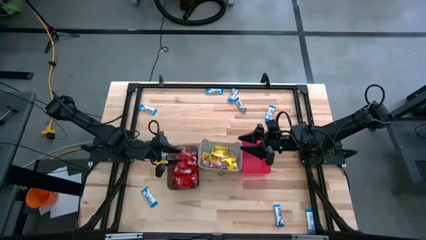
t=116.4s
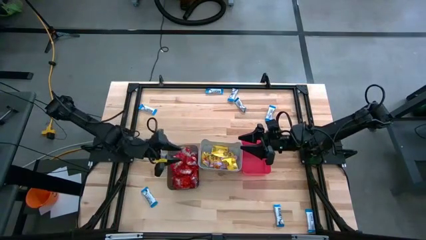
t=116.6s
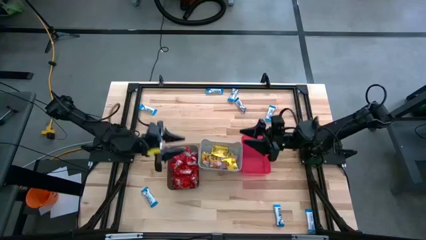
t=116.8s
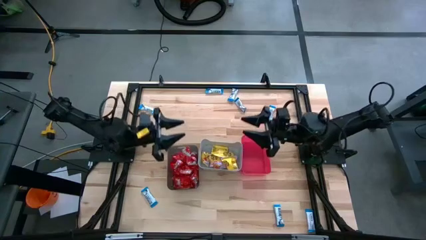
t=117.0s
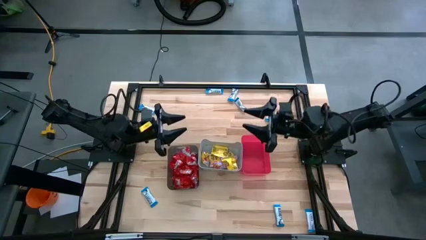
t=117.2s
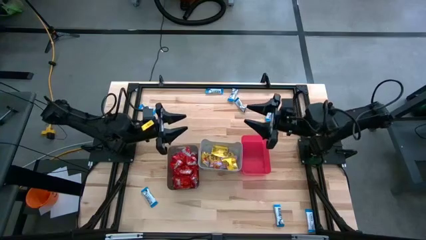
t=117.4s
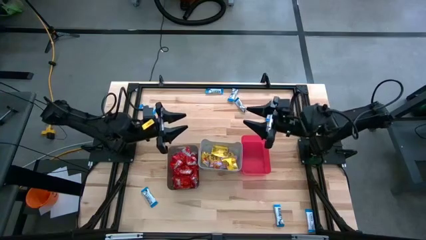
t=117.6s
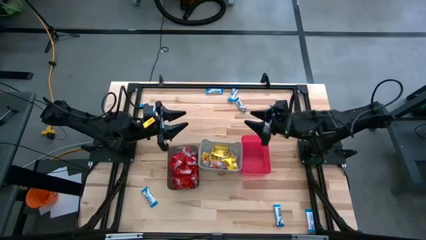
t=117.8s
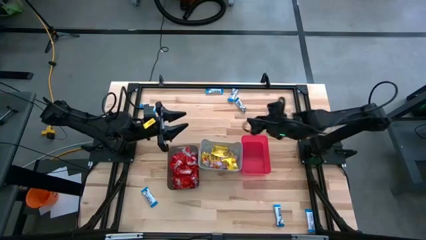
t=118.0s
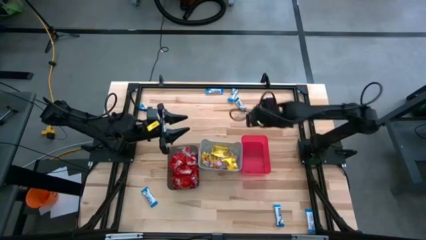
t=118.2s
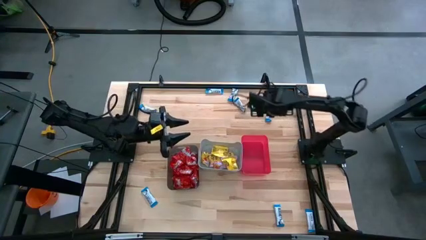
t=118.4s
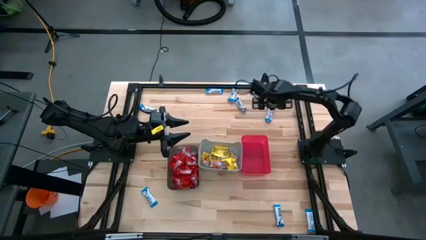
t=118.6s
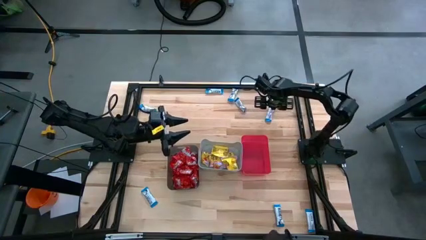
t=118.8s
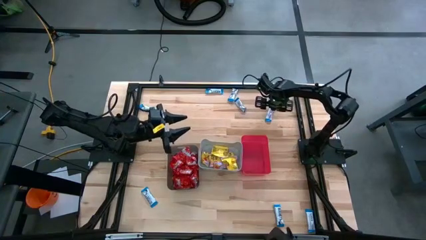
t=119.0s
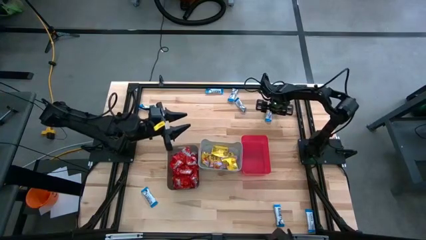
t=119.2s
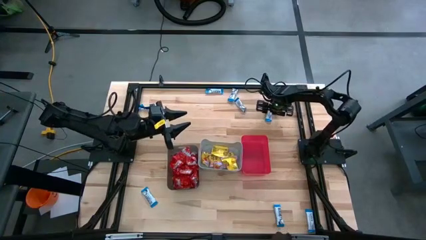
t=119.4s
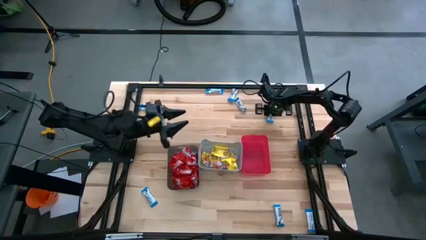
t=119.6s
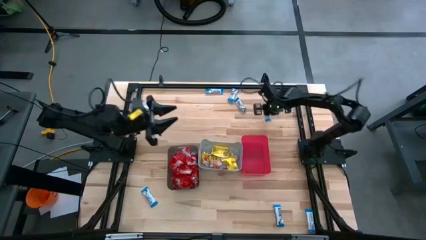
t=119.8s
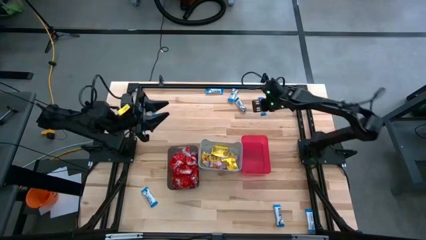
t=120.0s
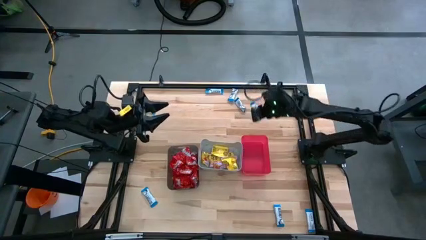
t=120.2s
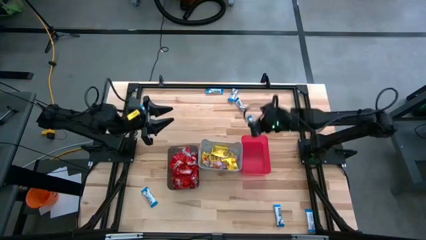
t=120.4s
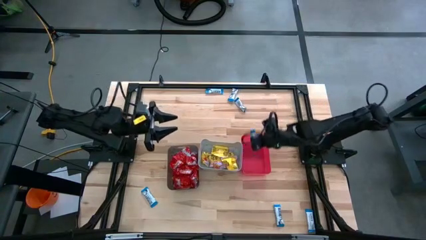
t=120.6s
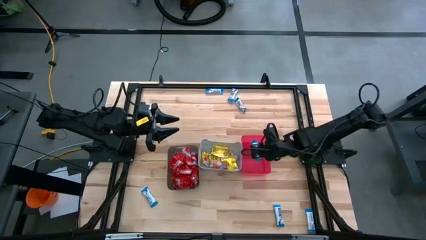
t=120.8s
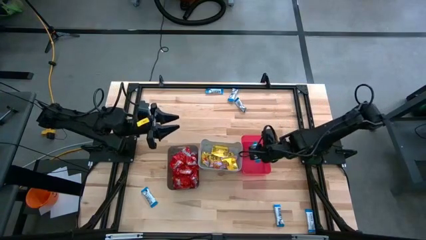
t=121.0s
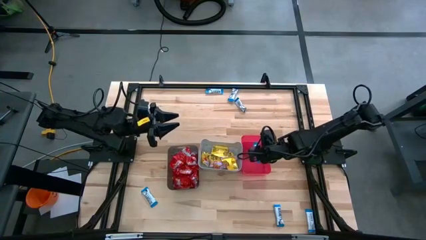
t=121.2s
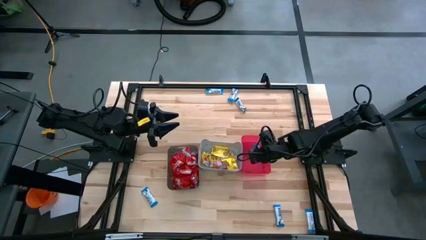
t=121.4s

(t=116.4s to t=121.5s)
Task: Sort candy
Put the white chocolate into the pink bin

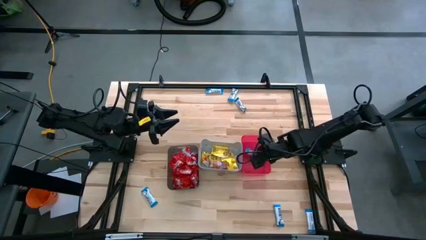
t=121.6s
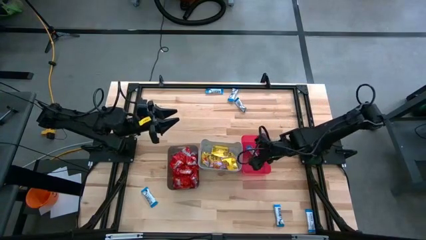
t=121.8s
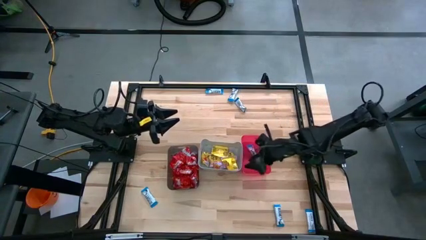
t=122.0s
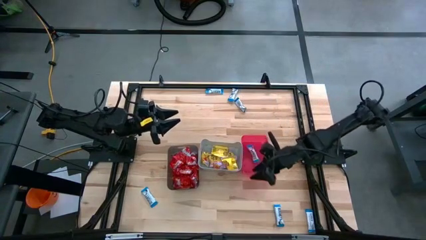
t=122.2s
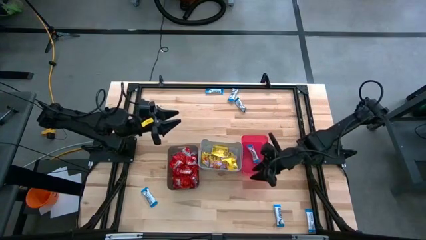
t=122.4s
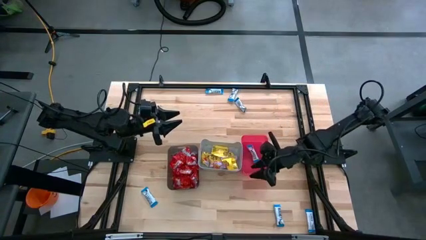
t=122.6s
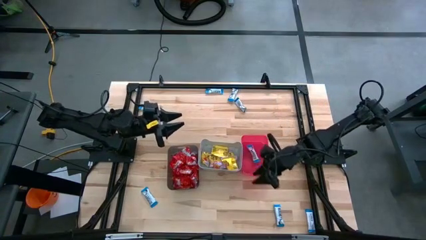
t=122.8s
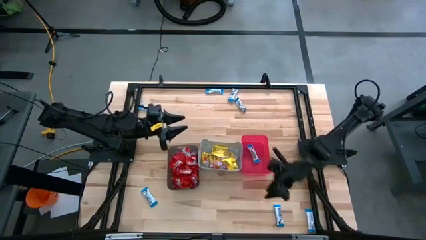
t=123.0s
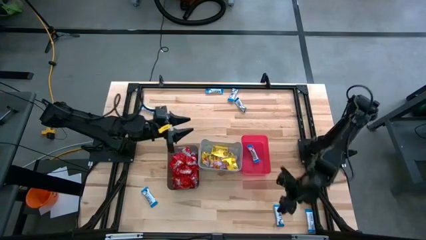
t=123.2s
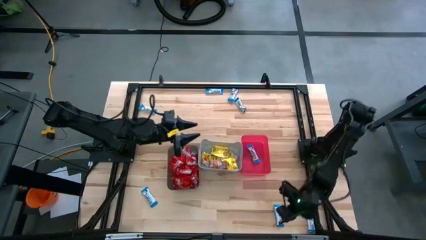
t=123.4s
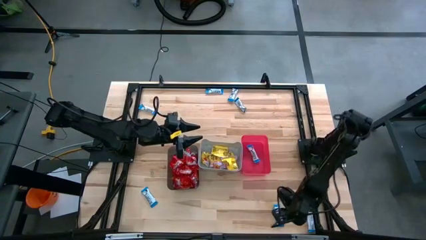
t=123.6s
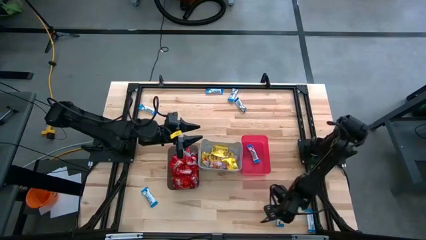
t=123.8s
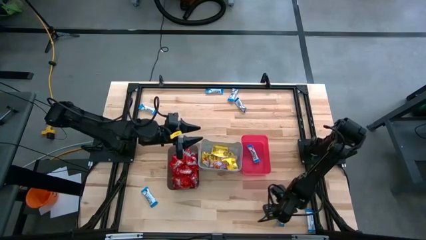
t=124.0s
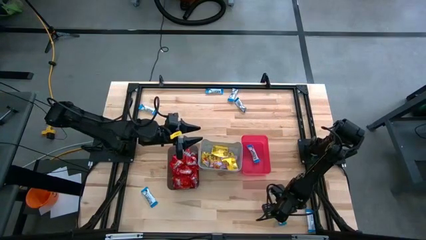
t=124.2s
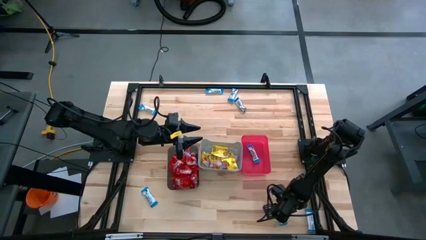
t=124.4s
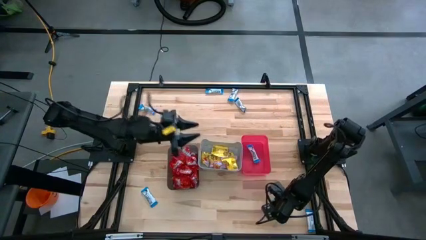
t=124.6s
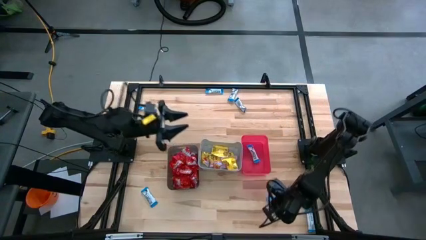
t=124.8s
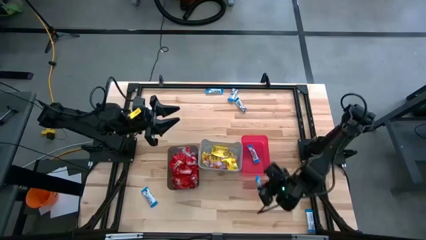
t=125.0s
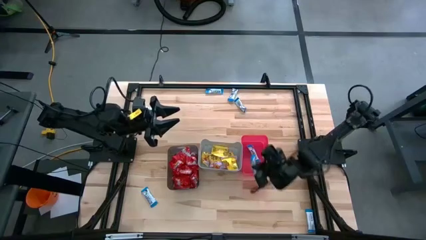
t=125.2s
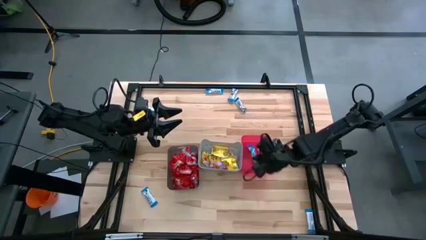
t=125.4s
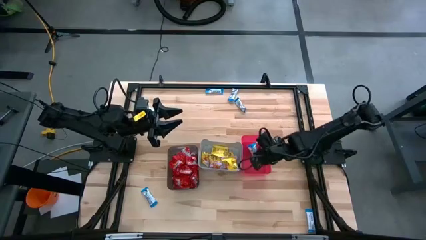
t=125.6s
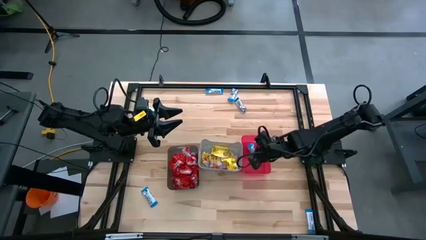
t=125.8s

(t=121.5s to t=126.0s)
Put the white chocolate into the pink bin

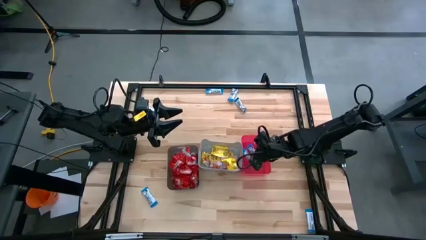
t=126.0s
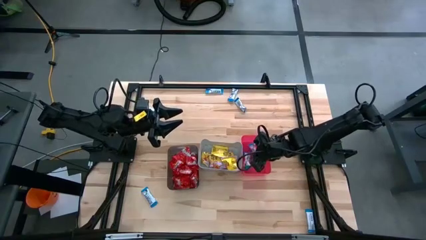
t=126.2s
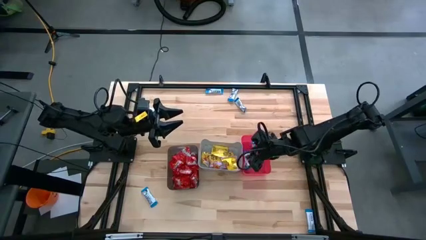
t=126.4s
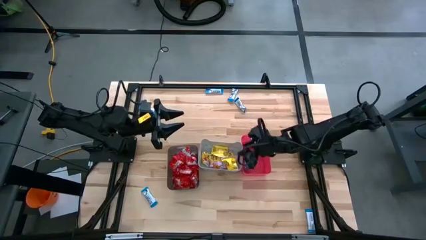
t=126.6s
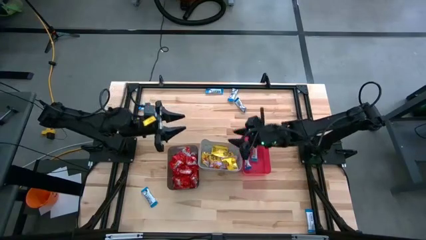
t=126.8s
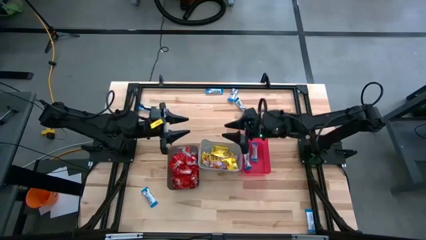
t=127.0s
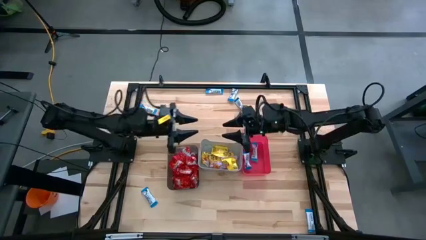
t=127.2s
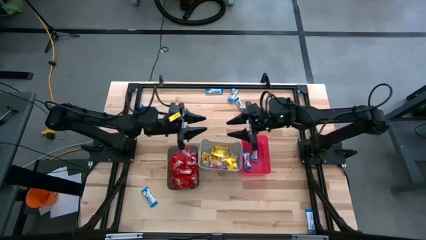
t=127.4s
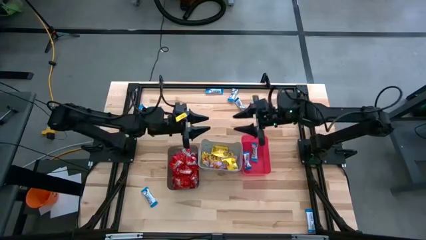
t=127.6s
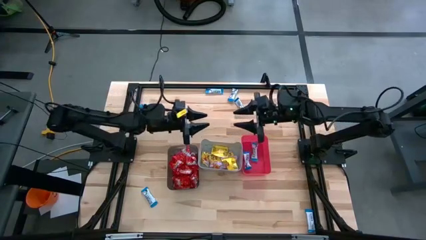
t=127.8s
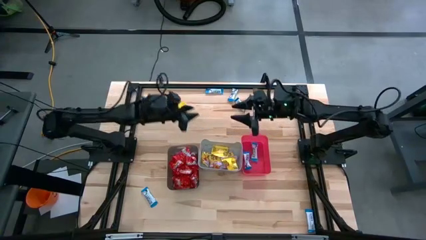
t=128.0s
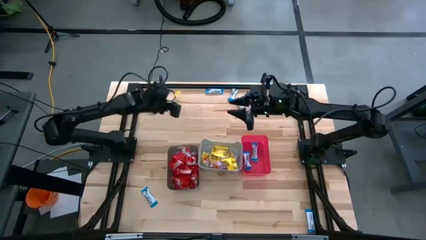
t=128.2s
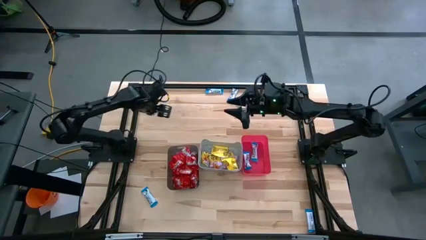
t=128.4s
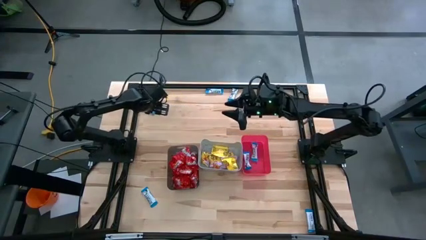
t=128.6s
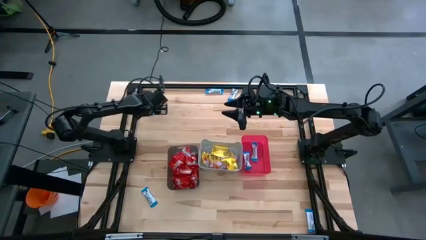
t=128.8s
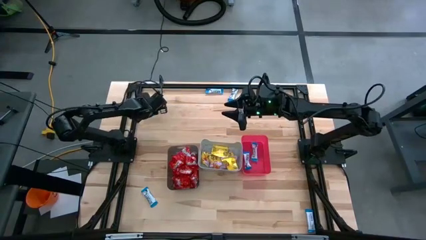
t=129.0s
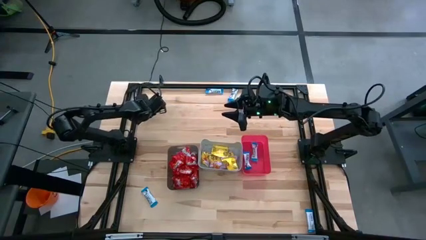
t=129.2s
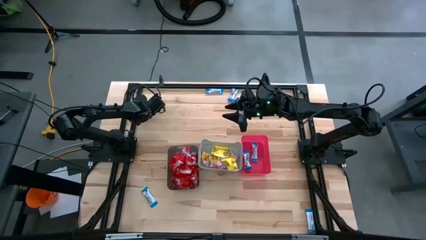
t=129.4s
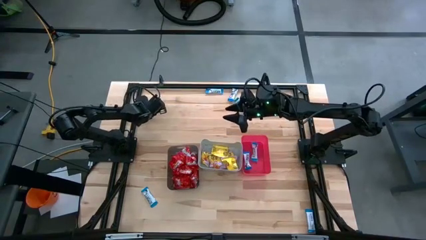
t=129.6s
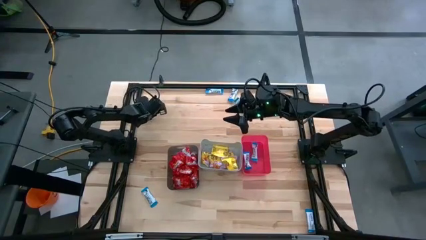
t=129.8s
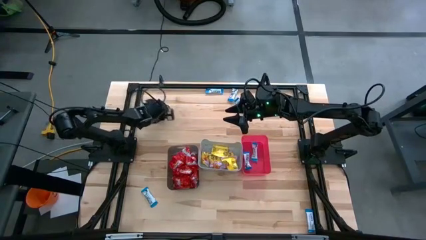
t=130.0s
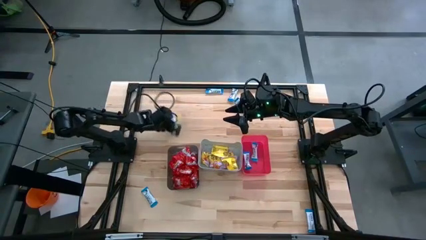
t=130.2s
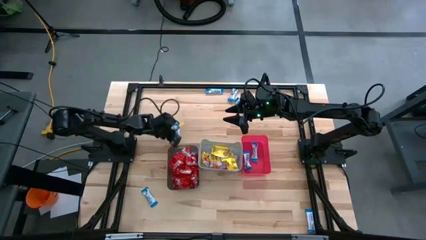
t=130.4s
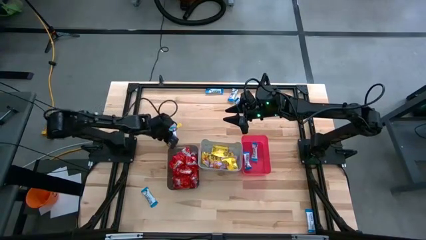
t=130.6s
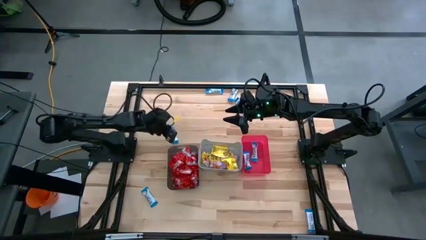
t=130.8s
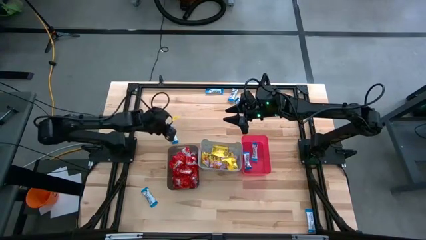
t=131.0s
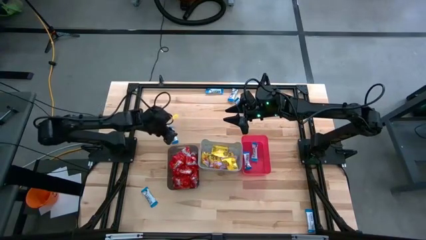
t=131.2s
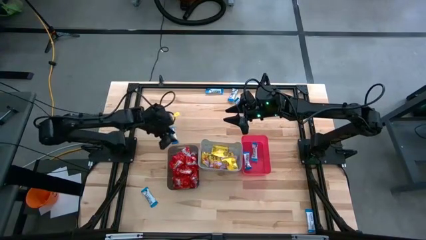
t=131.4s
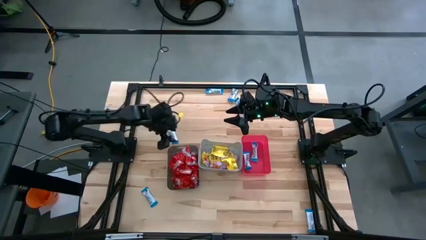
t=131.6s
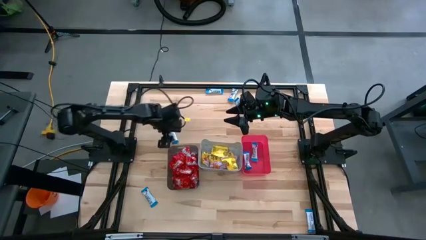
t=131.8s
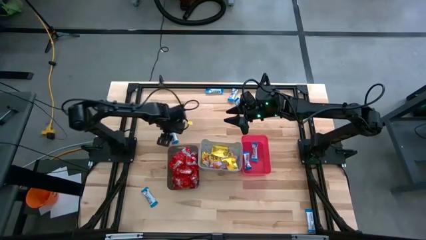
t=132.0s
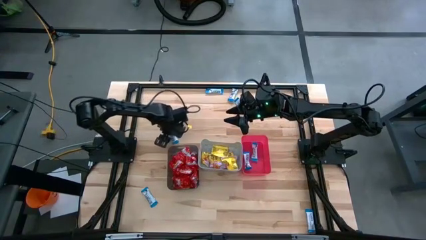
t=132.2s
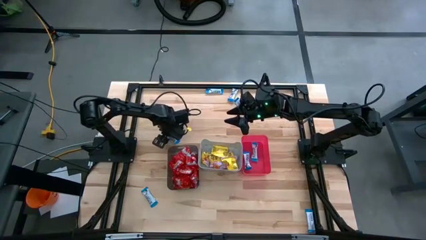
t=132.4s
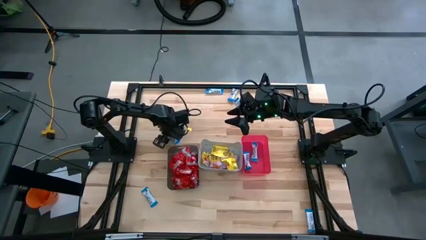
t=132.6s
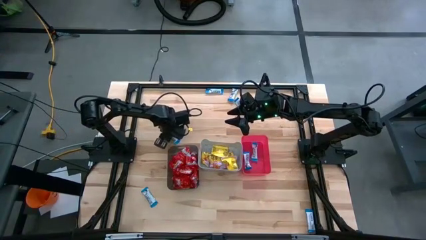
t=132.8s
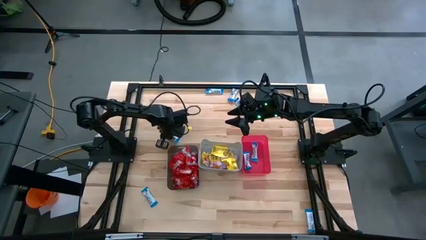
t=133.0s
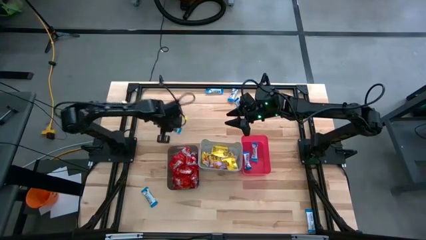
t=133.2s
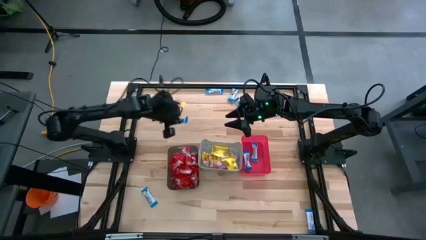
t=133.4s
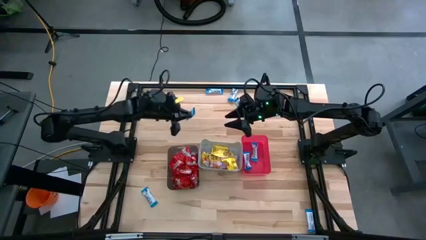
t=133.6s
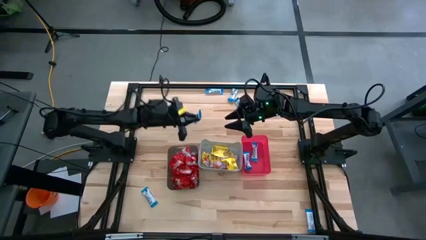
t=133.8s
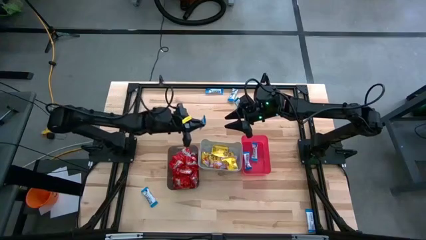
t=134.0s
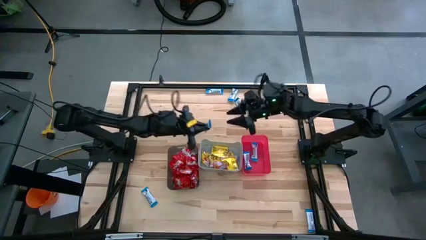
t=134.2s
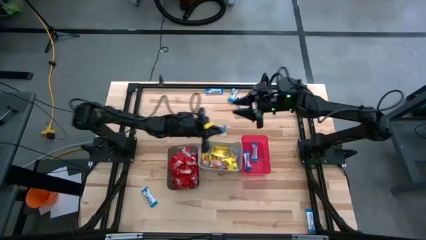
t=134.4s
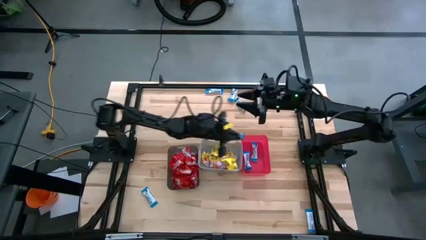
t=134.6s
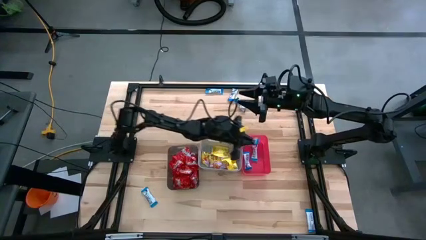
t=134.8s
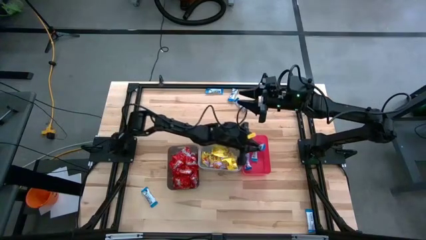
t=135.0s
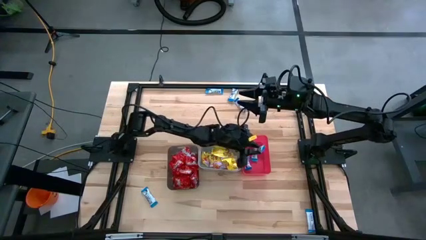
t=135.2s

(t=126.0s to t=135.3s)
Put the white chocolate into the pink bin
